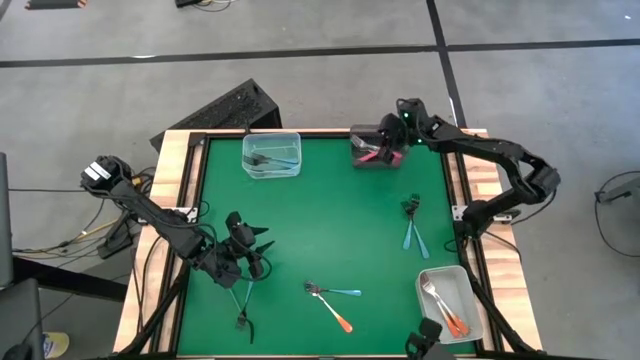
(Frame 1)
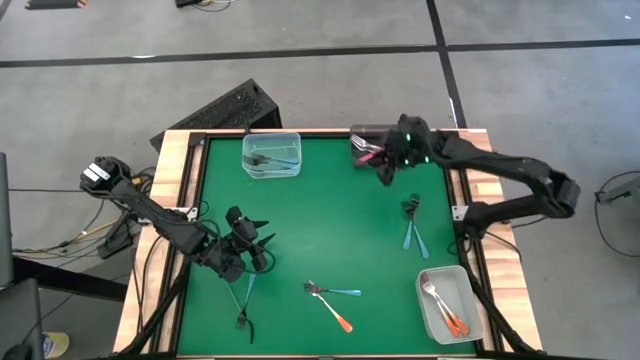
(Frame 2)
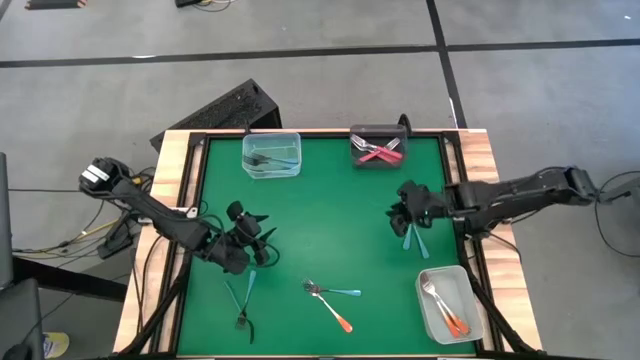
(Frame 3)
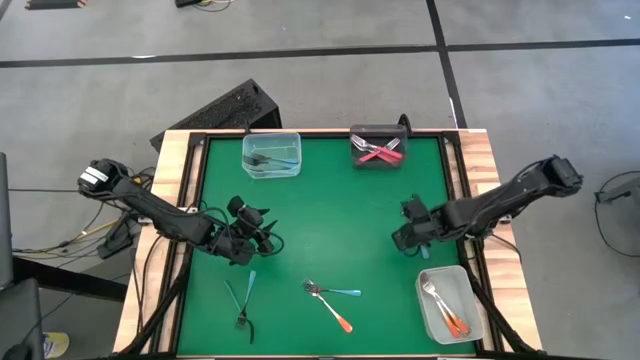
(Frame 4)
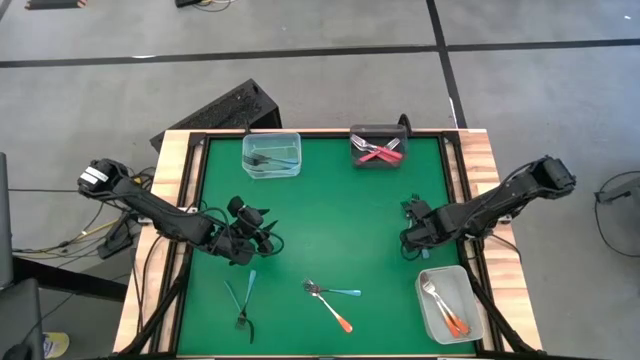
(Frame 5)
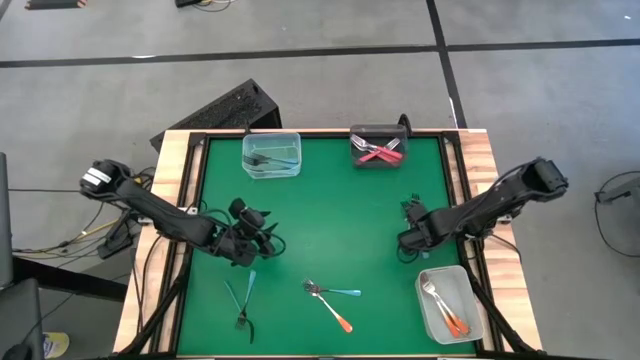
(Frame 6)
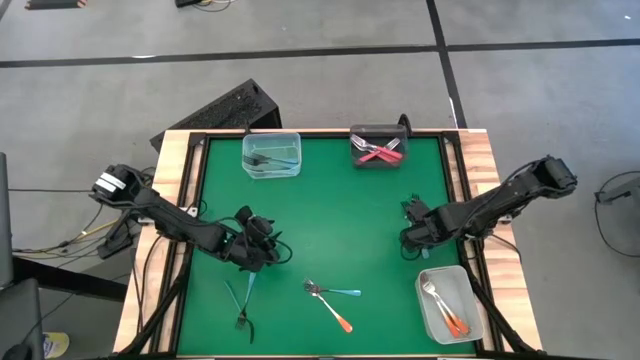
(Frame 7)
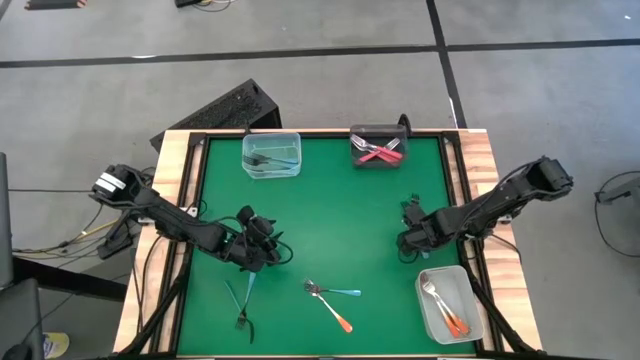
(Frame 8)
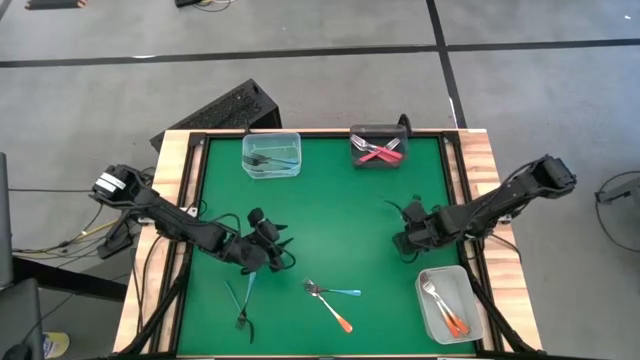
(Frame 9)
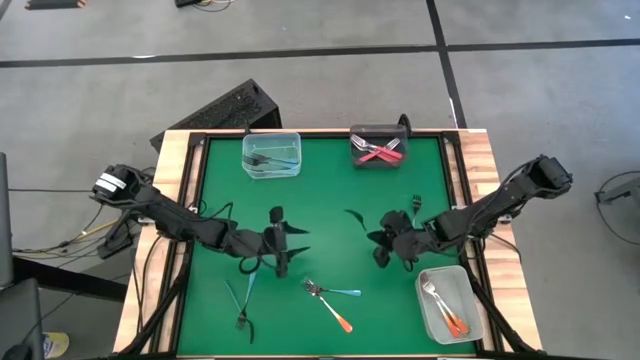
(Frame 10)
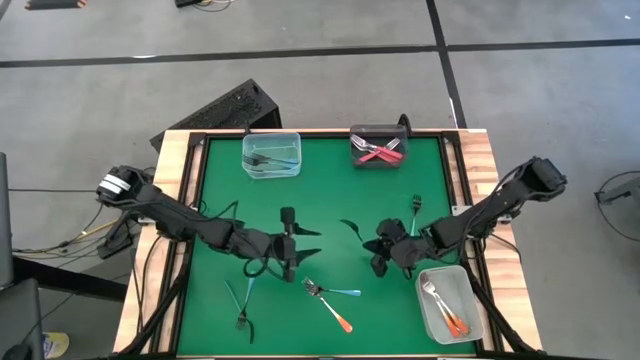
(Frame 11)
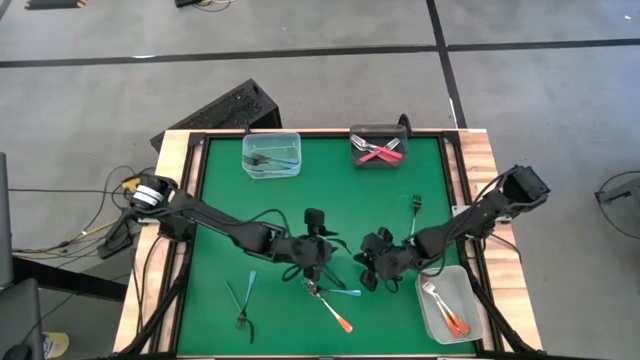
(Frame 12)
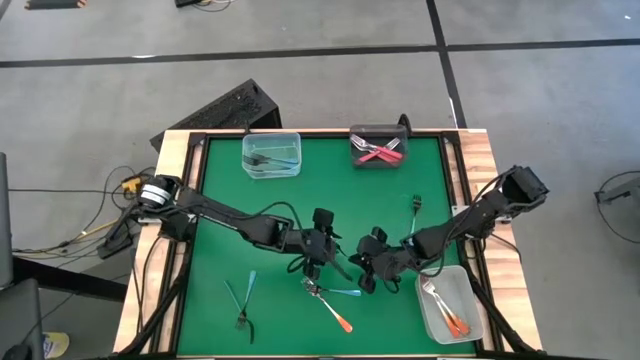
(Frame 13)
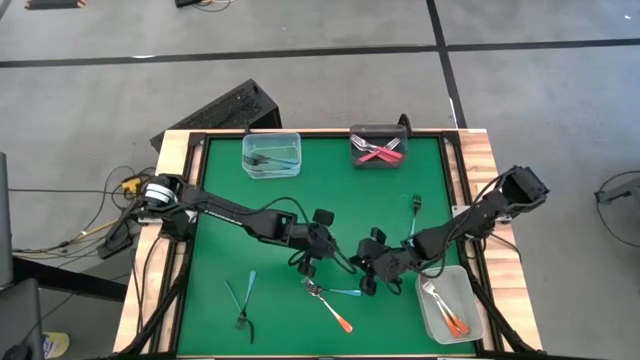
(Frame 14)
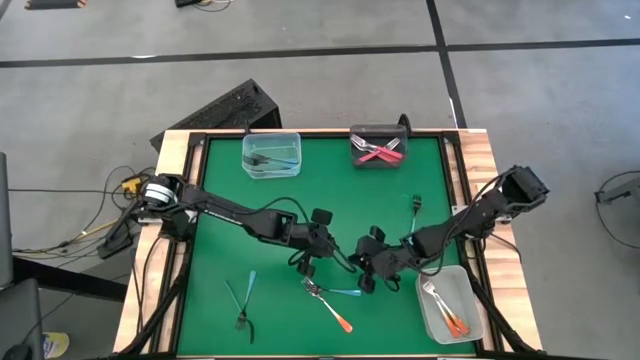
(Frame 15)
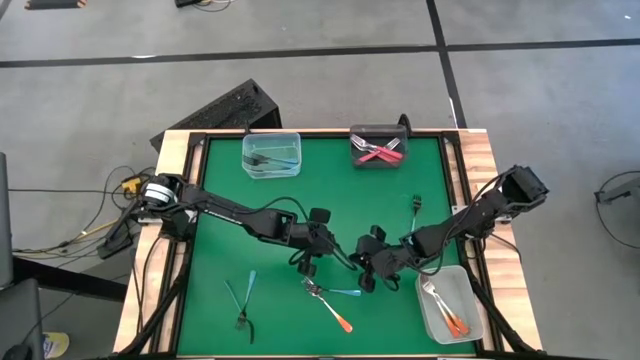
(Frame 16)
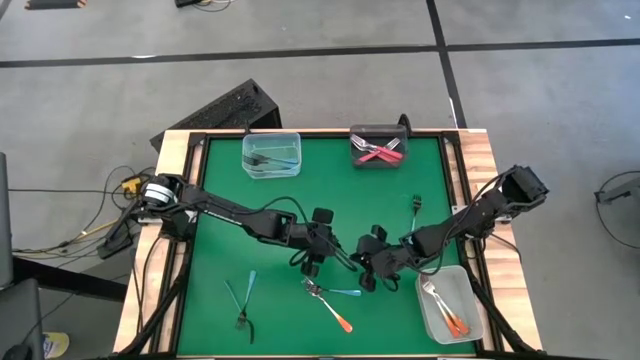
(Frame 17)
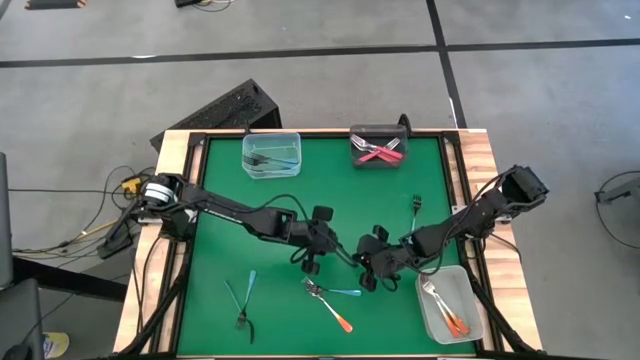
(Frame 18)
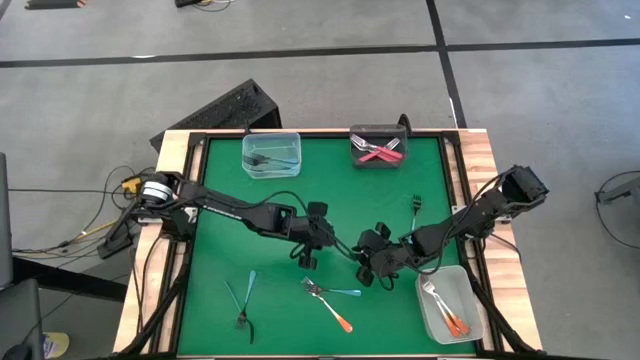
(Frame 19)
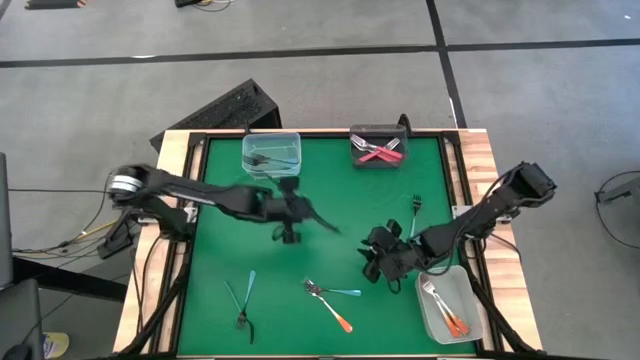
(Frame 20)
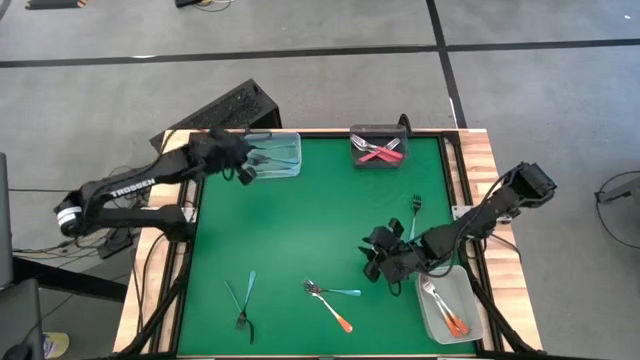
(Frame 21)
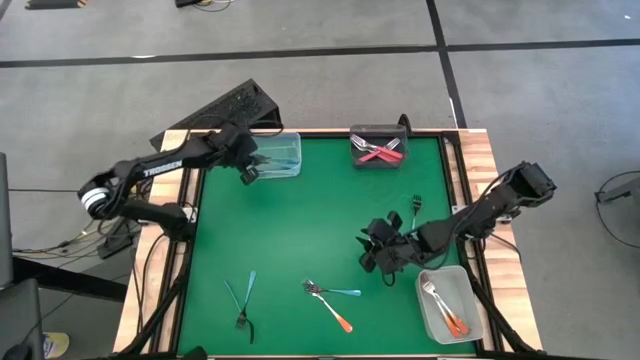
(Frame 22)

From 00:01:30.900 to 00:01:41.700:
Task: Sort silverware by color (type)
Put the black fork into the transparent bin

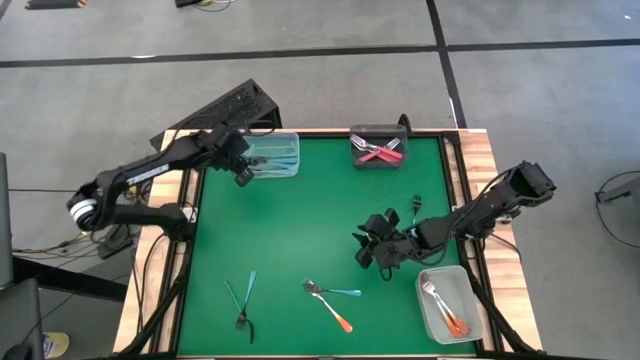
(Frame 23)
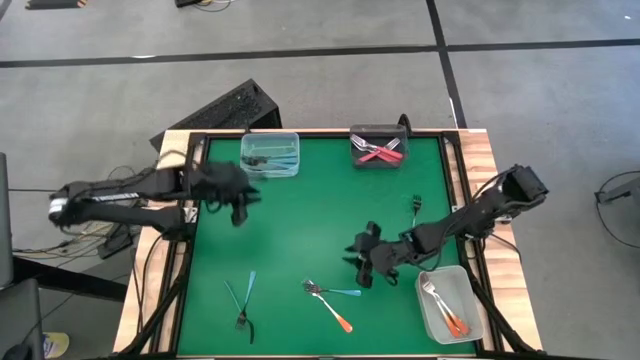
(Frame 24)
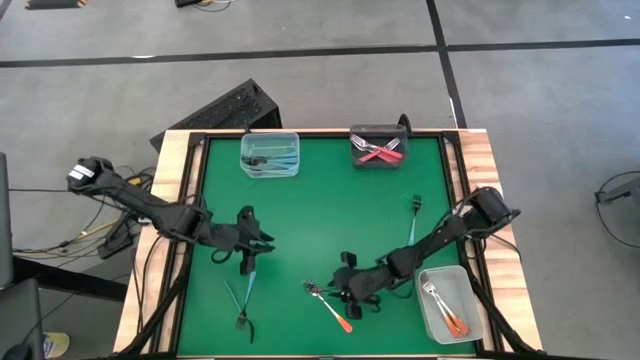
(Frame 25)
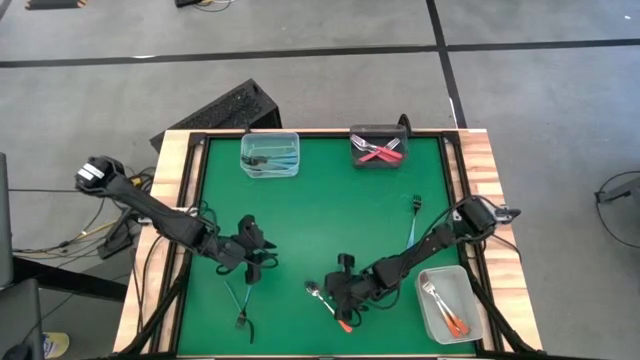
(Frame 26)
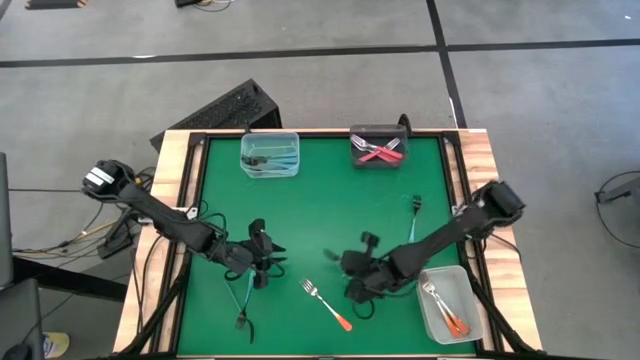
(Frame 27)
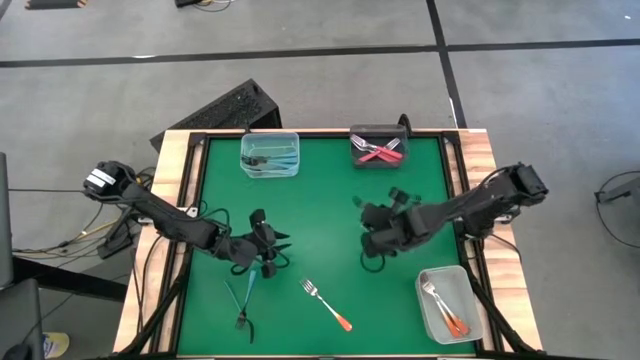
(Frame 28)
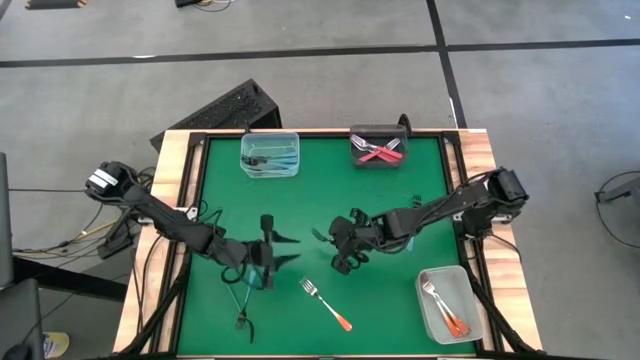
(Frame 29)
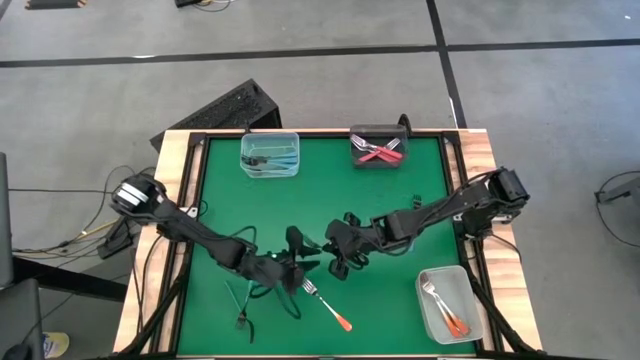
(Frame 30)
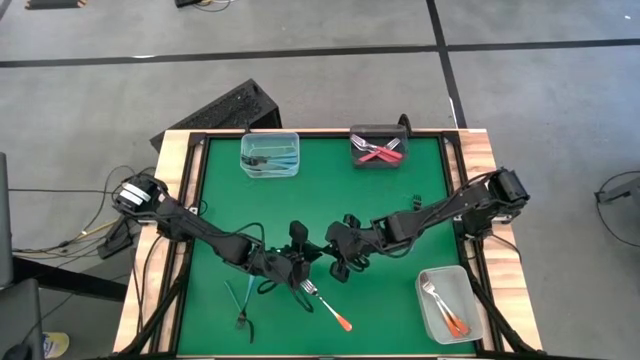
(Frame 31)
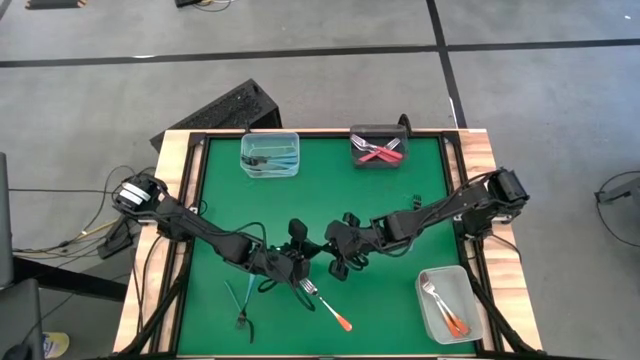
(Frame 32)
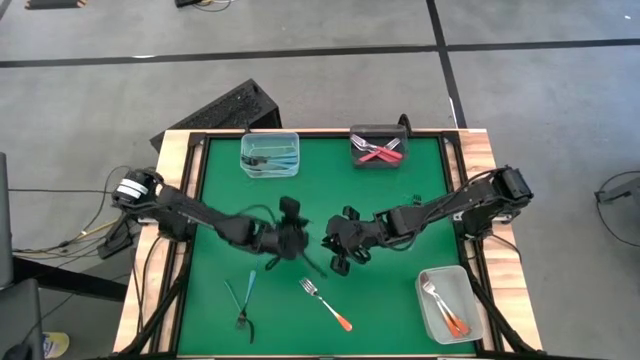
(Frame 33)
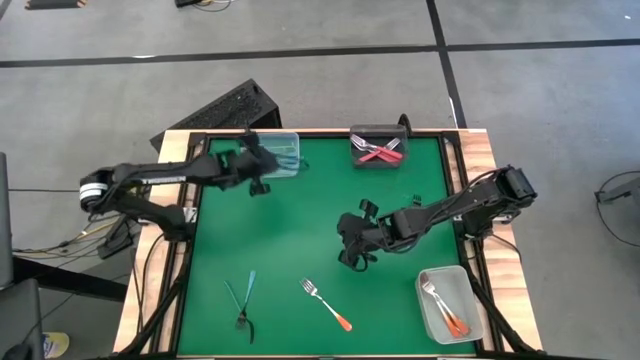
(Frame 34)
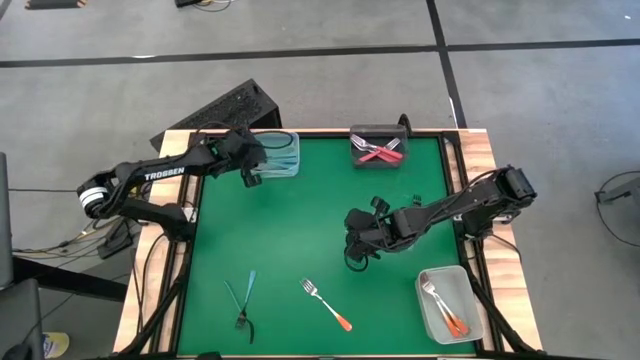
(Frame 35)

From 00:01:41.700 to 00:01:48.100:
Put the black fork into the transparent bin

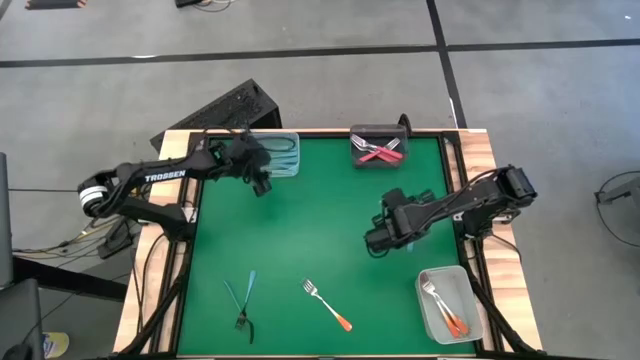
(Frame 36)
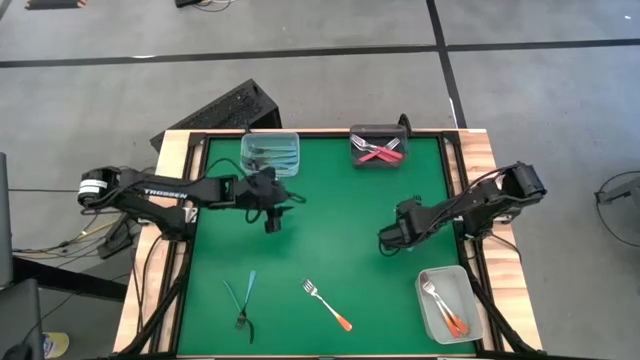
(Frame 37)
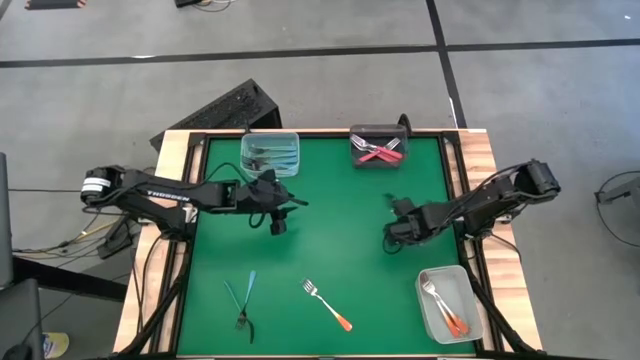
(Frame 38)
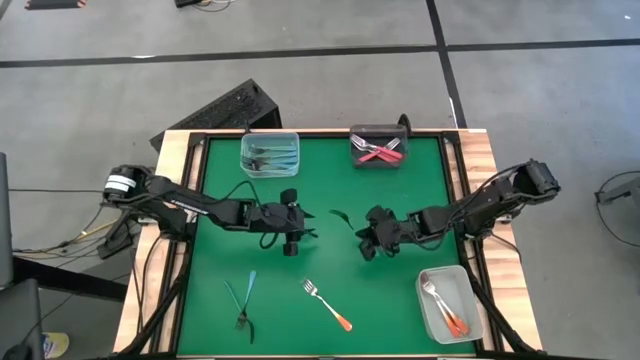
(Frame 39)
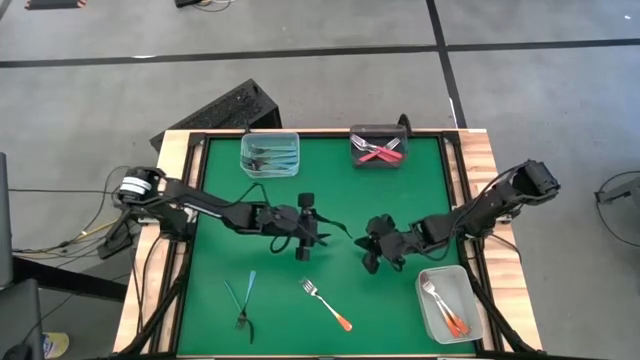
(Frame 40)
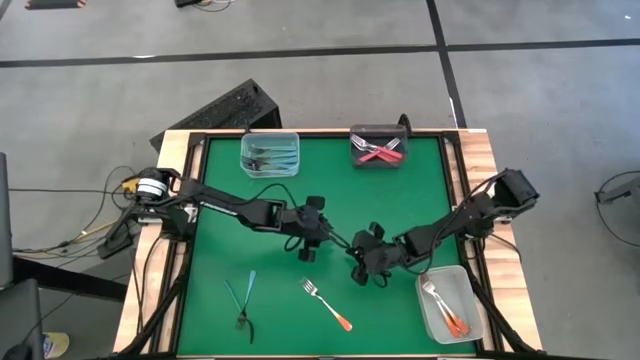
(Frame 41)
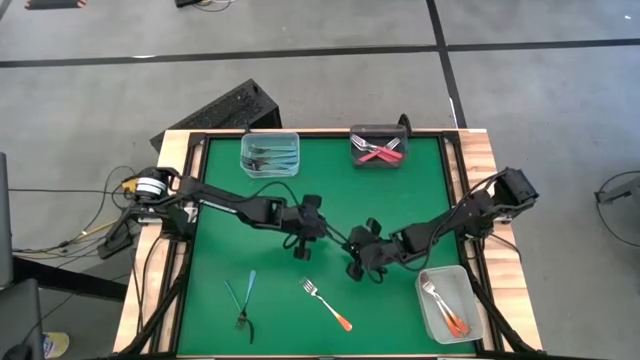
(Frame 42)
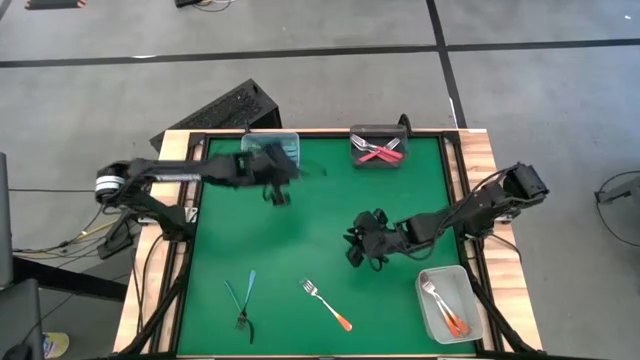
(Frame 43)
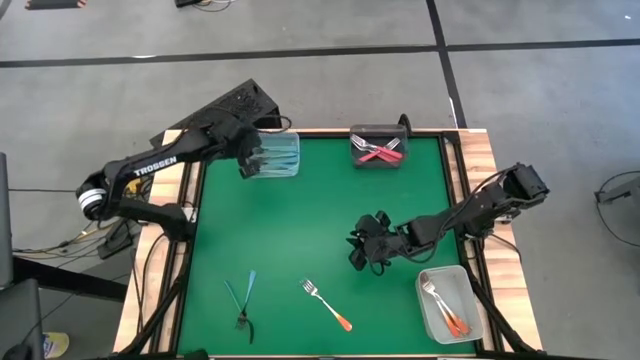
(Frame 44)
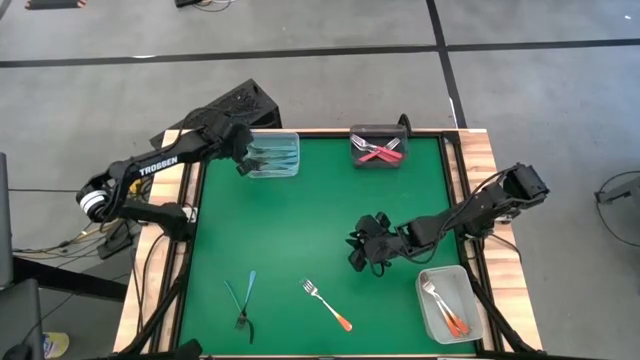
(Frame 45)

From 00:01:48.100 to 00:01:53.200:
Put the black fork into the transparent bin
